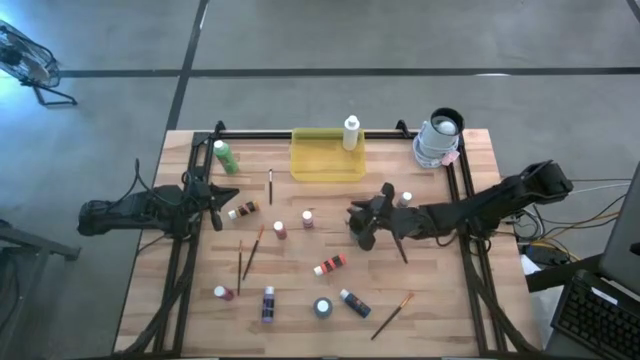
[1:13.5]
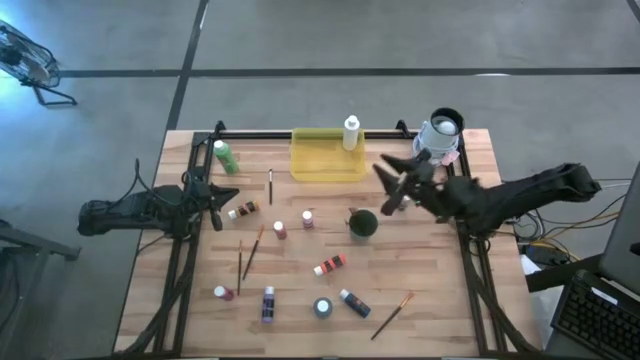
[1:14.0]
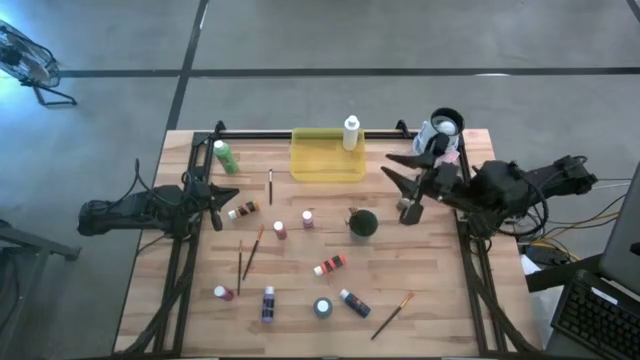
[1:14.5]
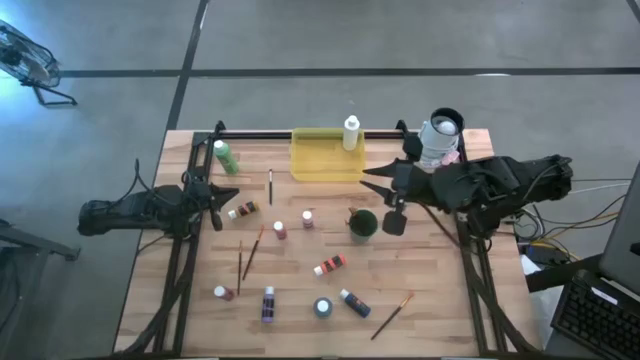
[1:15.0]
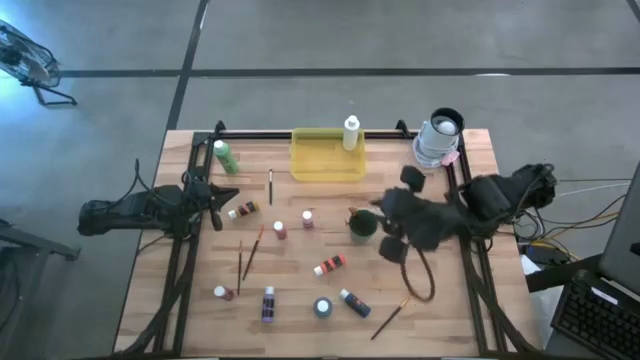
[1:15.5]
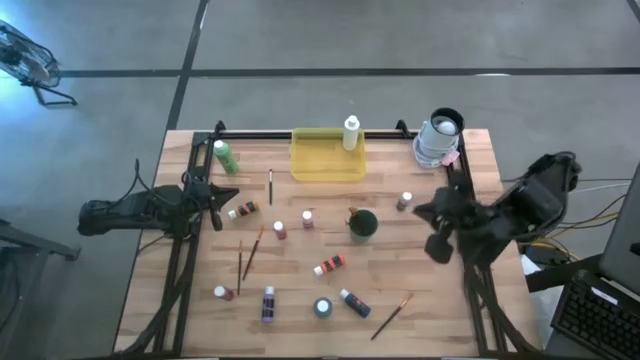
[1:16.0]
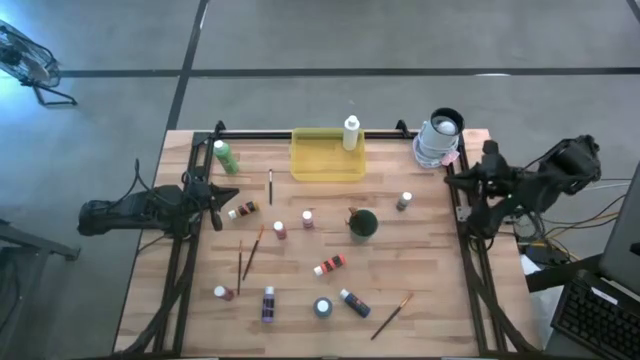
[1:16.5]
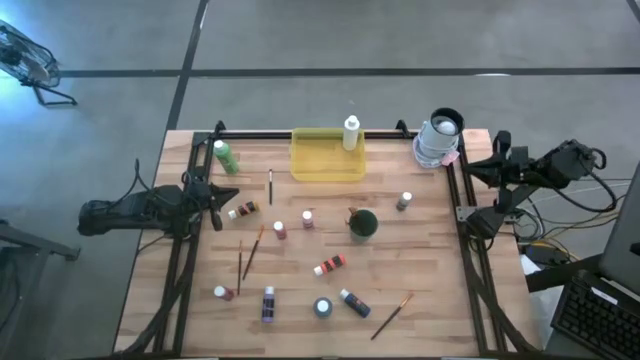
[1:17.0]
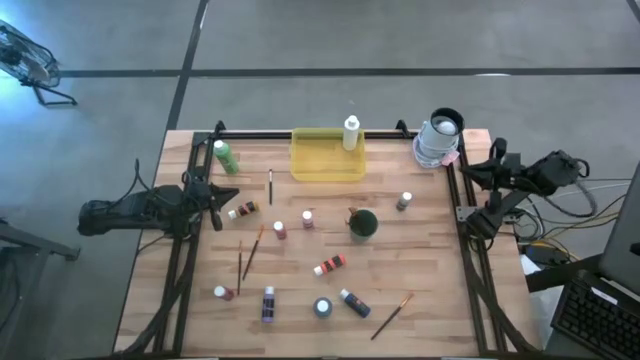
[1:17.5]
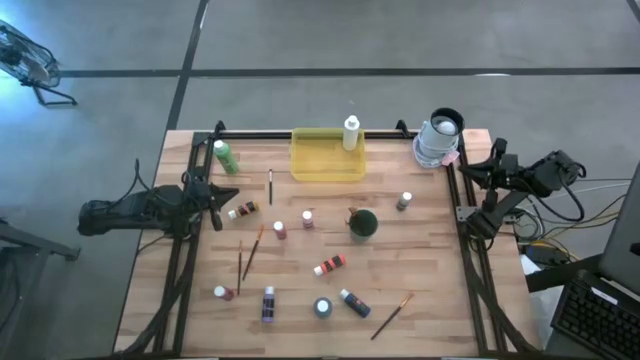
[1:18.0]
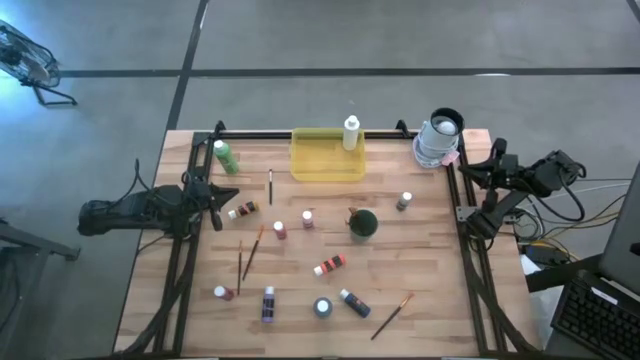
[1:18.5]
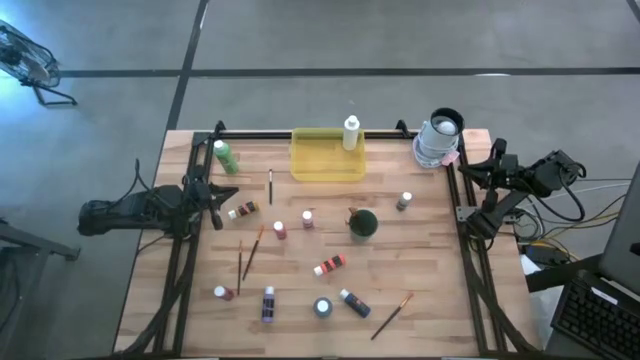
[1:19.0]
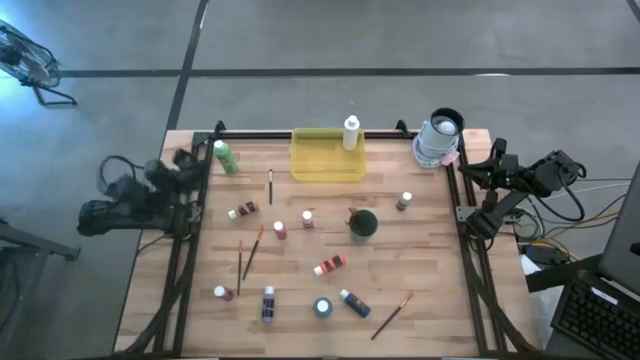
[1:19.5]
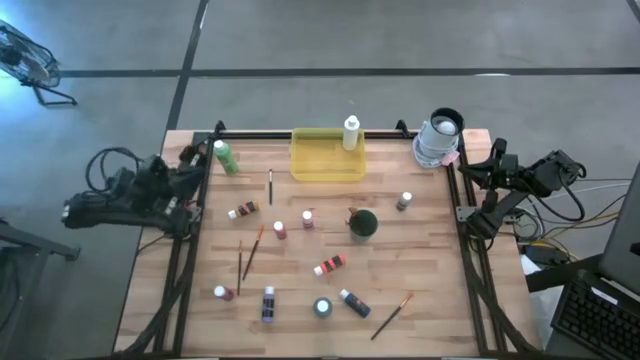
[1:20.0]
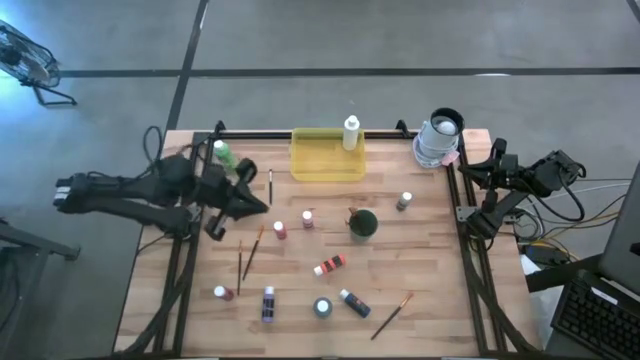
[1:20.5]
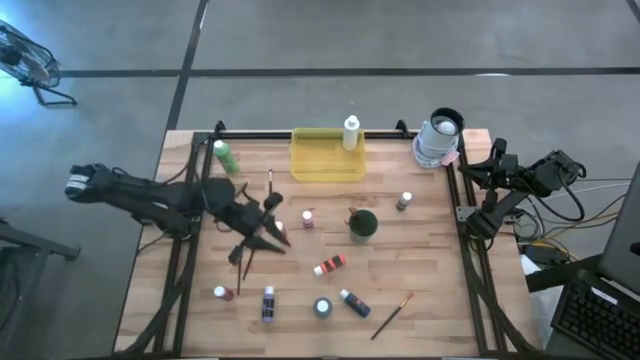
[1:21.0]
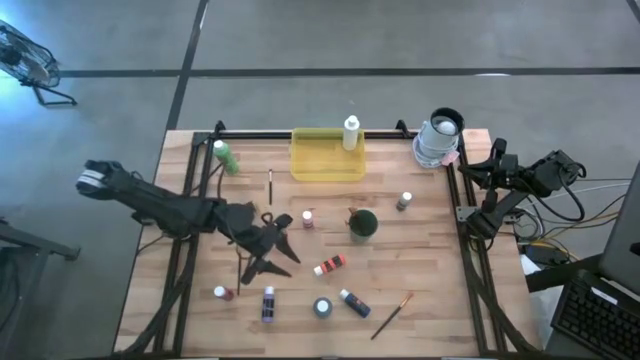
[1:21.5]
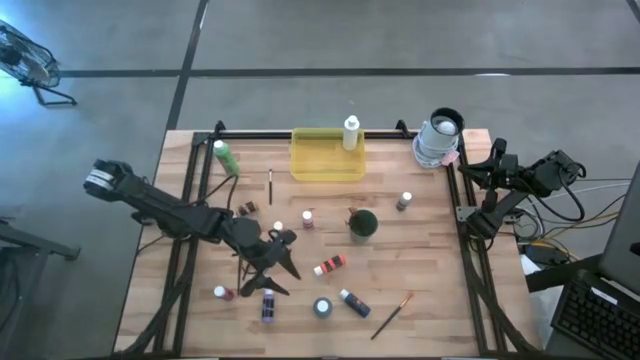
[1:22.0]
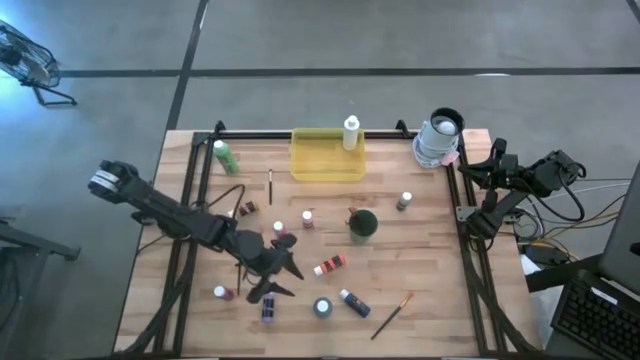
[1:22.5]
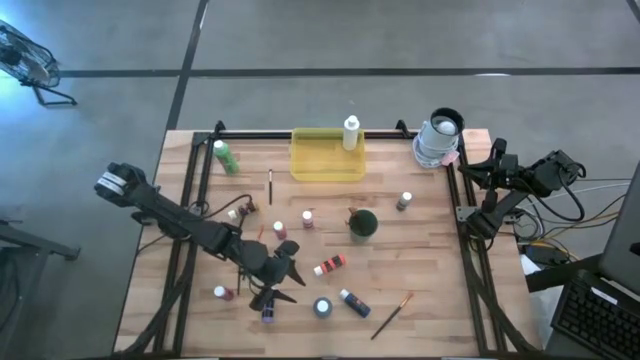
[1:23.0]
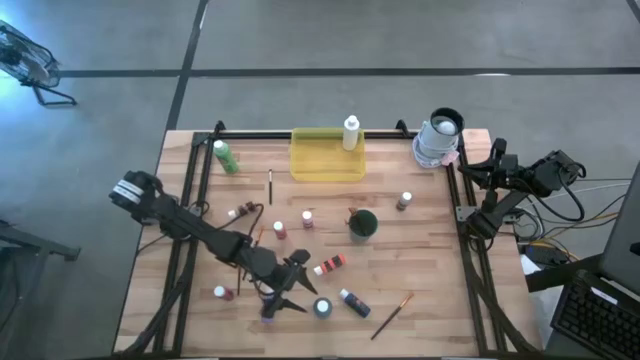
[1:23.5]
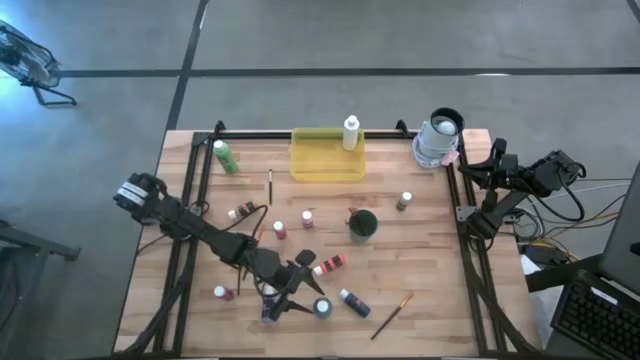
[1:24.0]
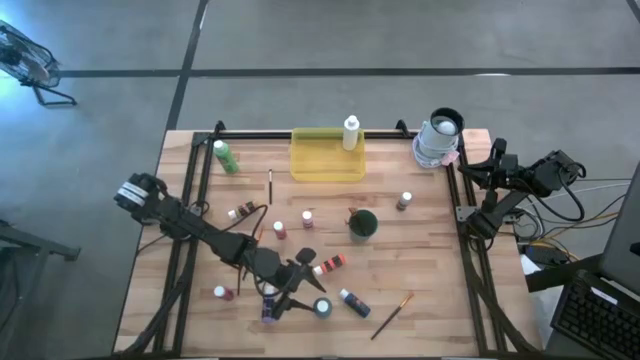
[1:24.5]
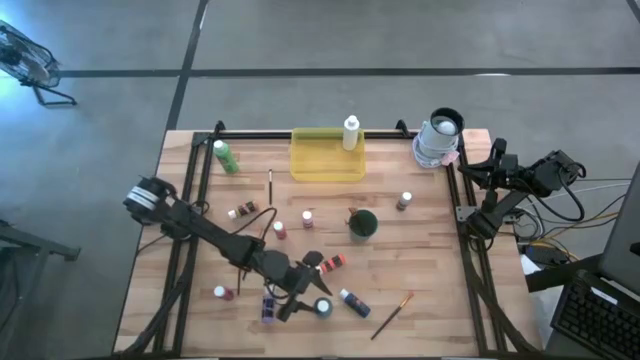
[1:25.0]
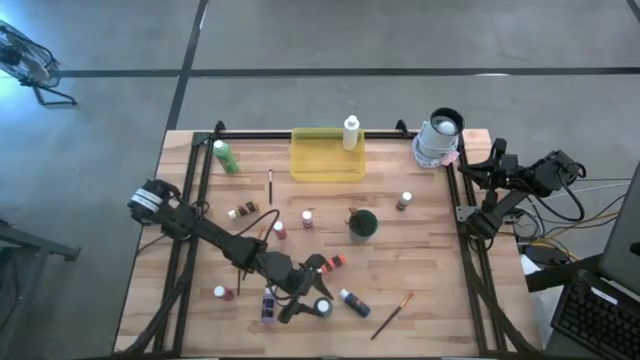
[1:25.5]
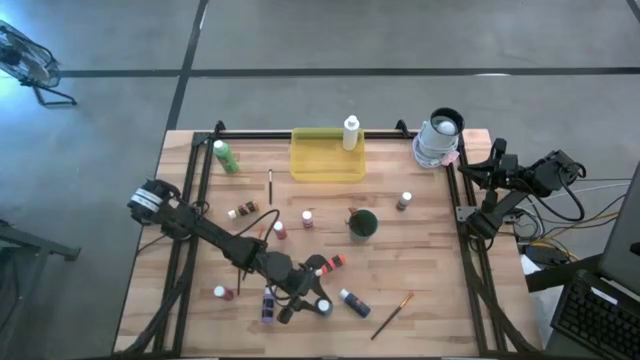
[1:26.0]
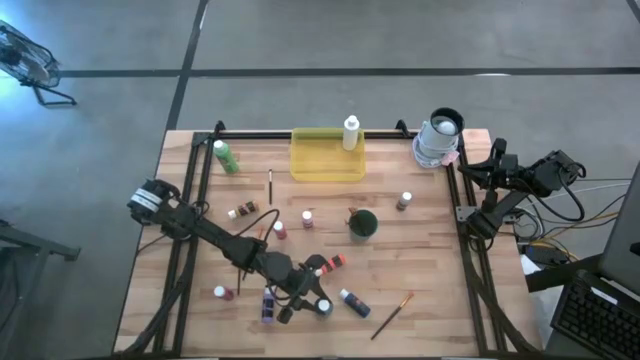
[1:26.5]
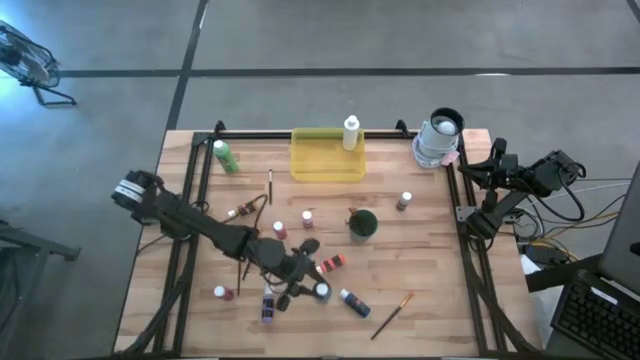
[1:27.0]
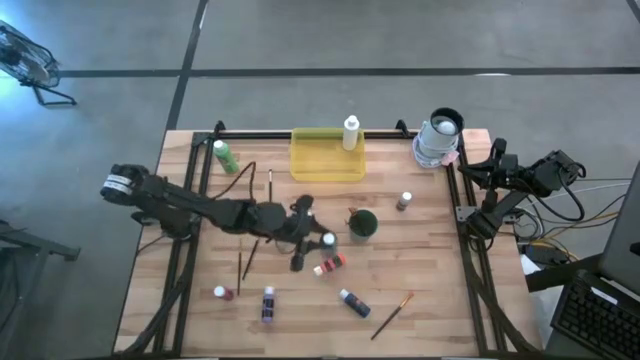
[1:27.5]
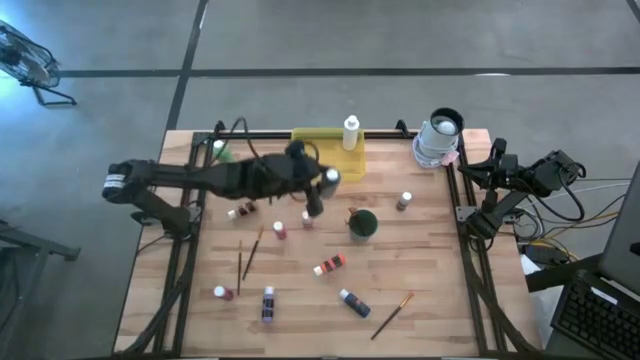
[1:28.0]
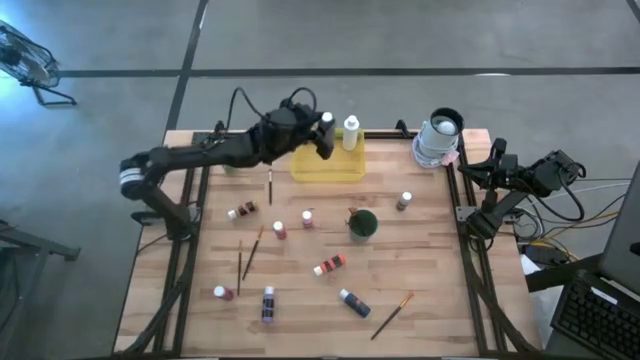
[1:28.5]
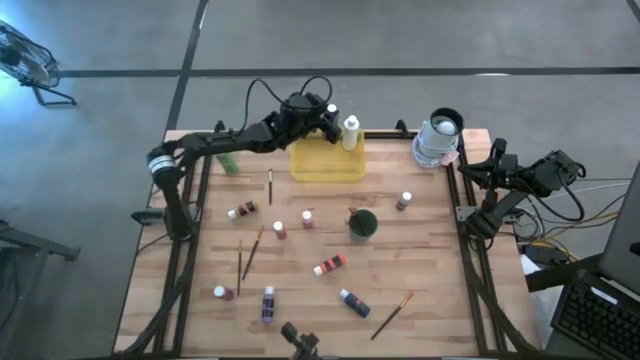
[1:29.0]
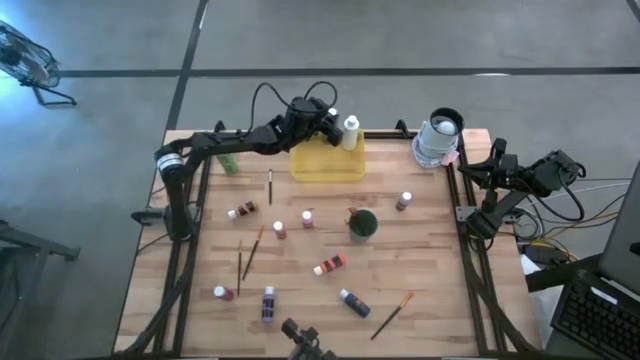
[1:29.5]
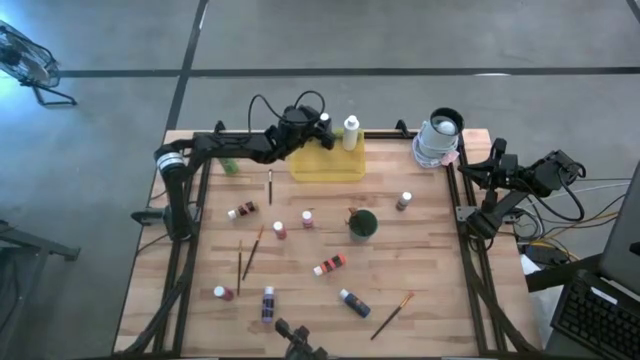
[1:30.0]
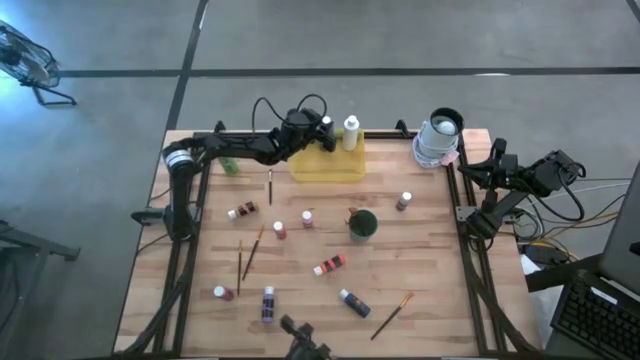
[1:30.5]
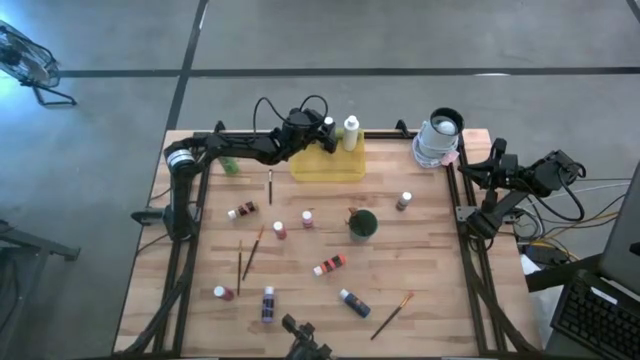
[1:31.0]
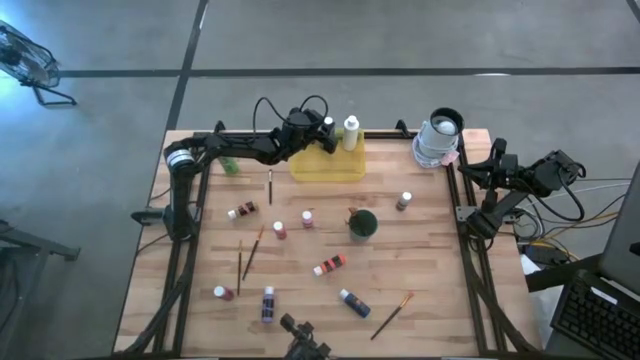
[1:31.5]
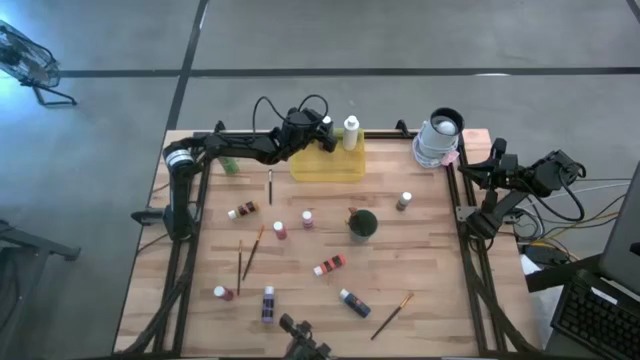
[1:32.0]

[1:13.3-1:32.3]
Task: Pick & Place Paint Supplies
Put the blue paint bottle into the yellow bin

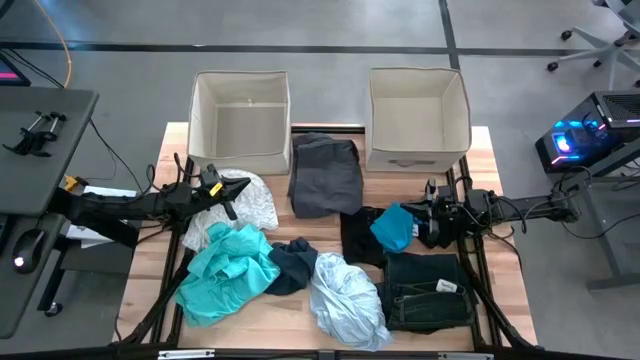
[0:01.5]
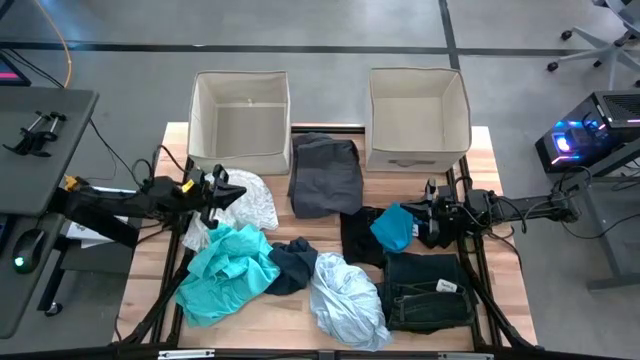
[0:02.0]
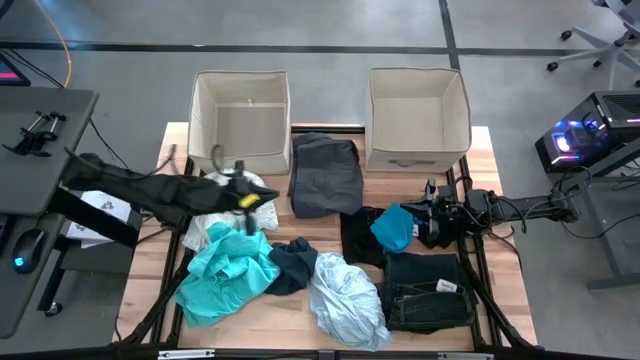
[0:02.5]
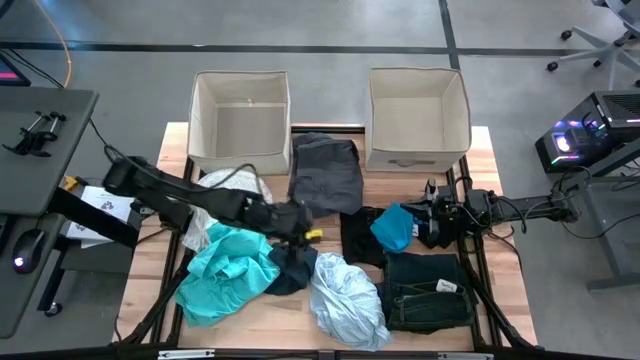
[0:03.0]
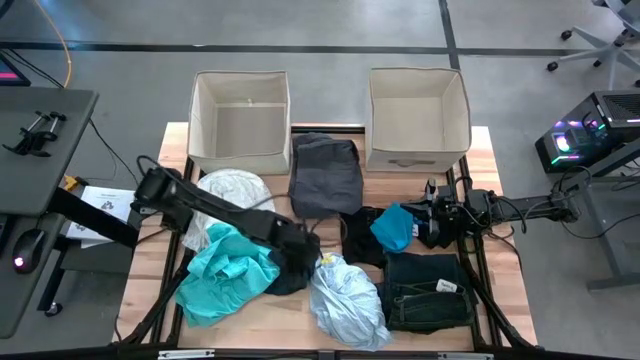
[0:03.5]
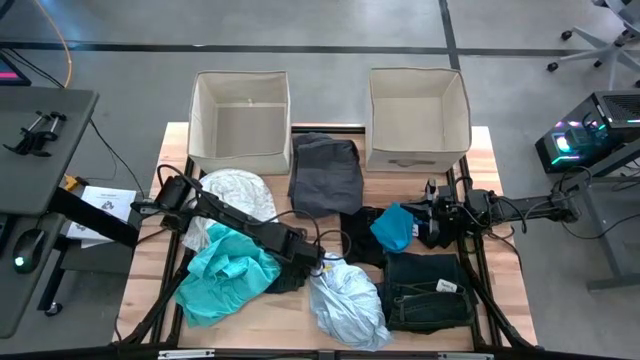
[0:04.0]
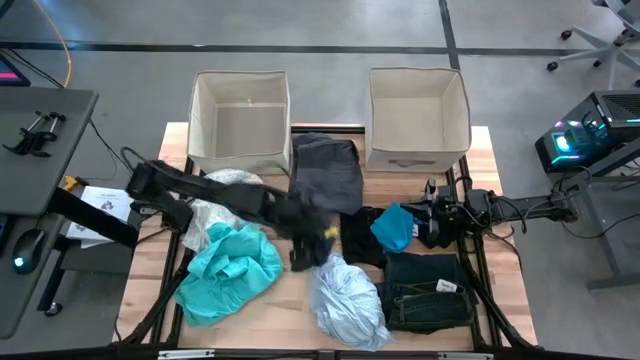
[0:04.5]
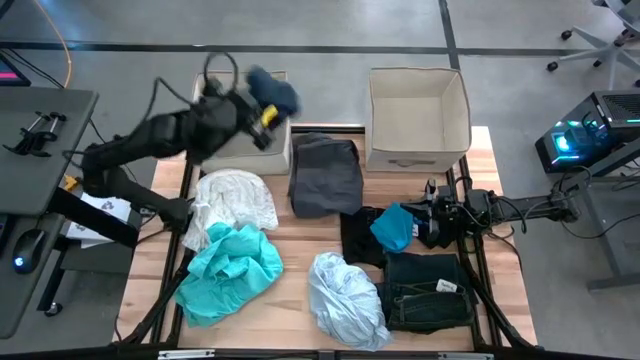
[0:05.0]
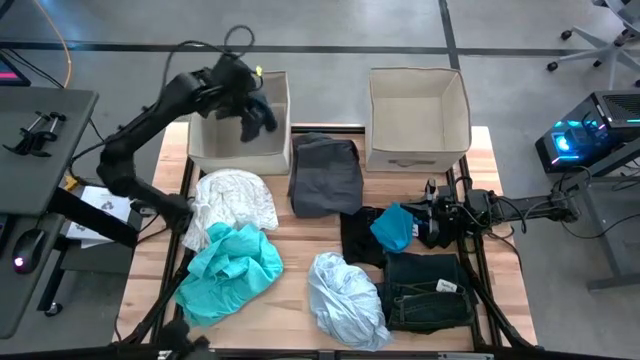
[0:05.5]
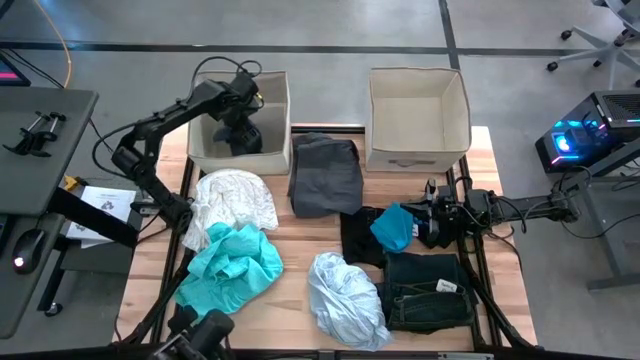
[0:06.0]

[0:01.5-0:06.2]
Task: Sort clothes
Put the dark blue underwear into the left laundry organizer
